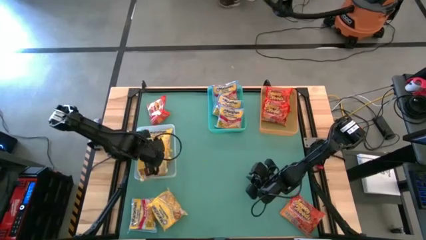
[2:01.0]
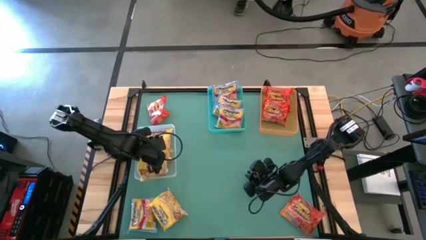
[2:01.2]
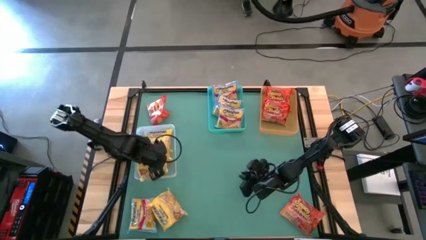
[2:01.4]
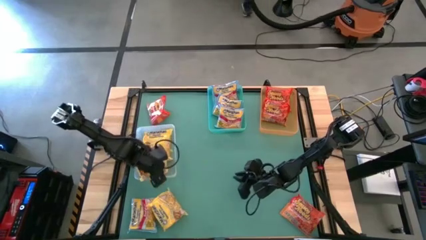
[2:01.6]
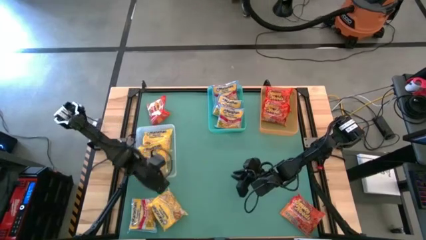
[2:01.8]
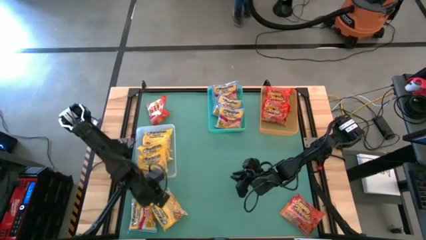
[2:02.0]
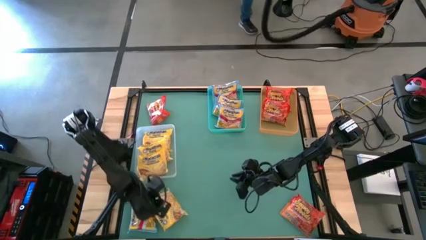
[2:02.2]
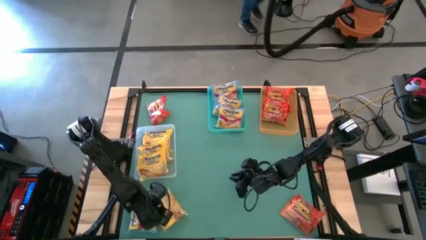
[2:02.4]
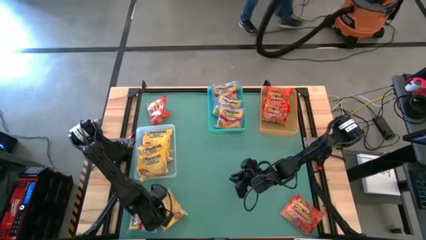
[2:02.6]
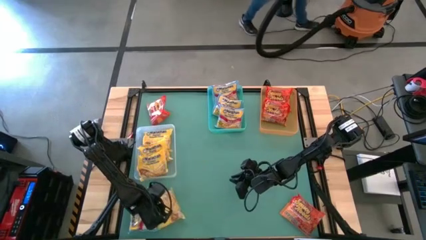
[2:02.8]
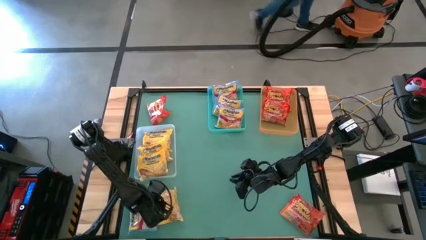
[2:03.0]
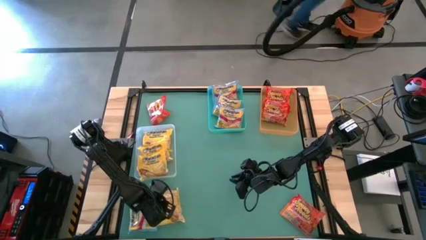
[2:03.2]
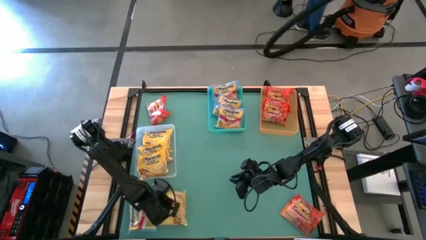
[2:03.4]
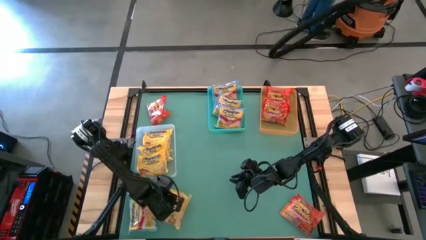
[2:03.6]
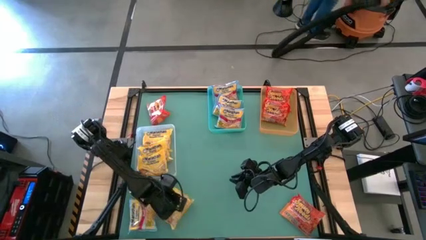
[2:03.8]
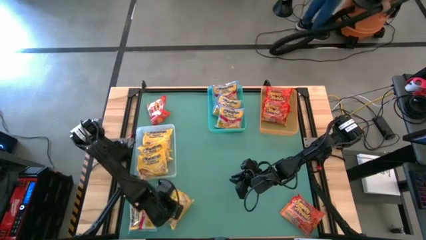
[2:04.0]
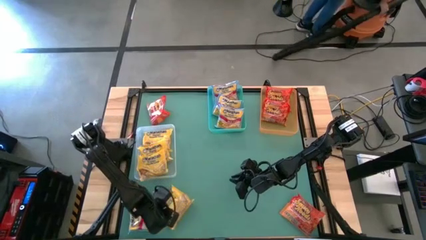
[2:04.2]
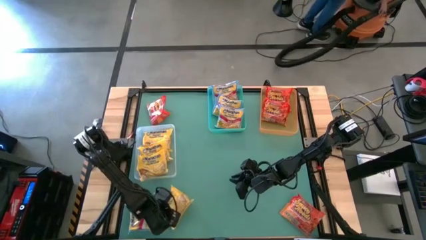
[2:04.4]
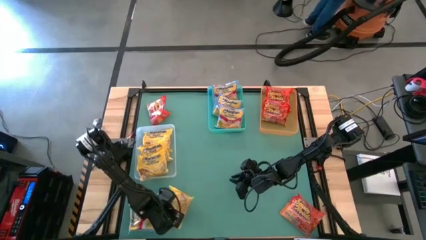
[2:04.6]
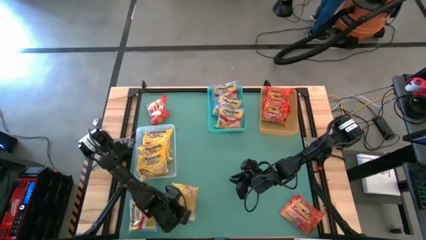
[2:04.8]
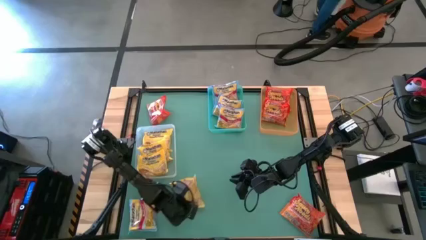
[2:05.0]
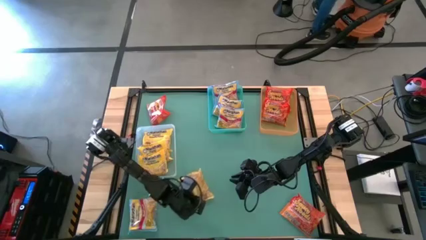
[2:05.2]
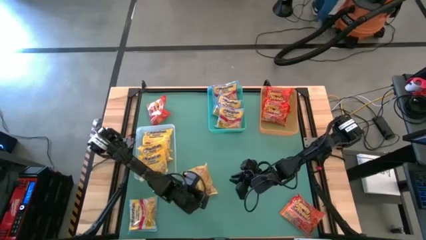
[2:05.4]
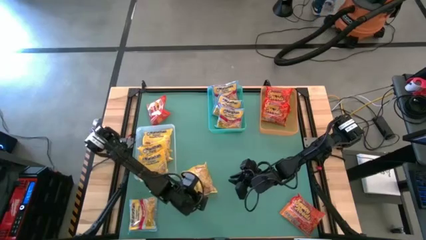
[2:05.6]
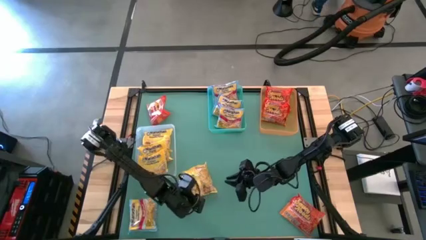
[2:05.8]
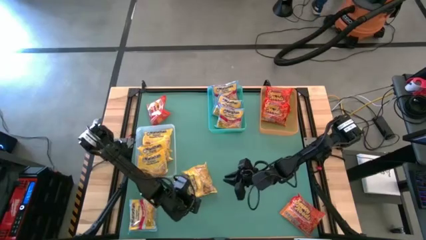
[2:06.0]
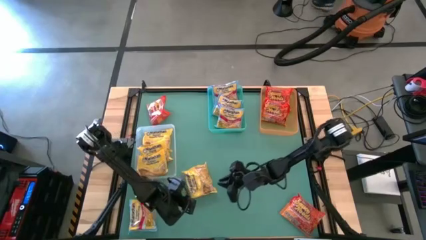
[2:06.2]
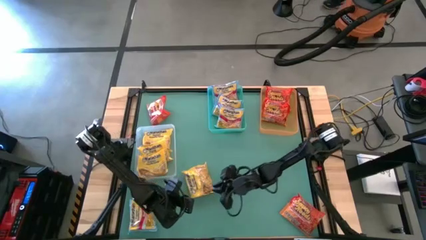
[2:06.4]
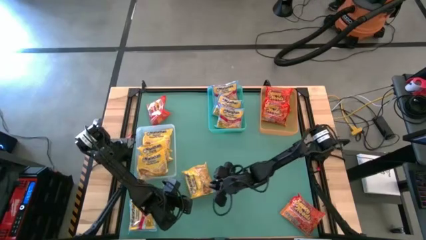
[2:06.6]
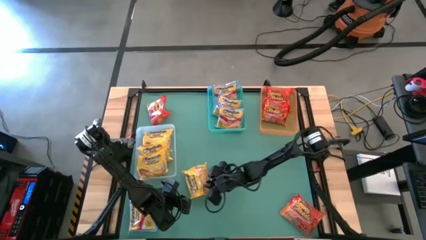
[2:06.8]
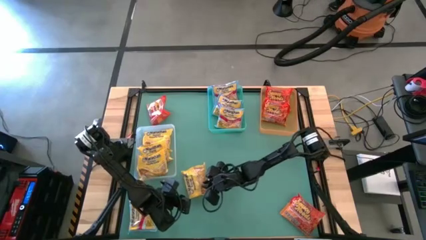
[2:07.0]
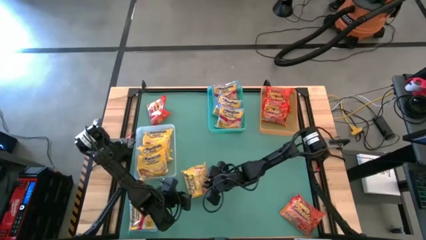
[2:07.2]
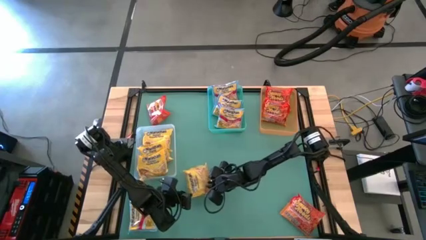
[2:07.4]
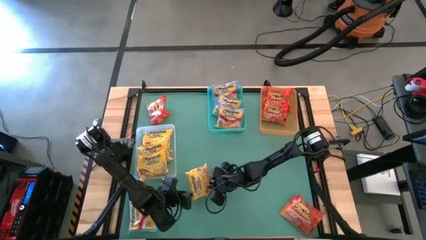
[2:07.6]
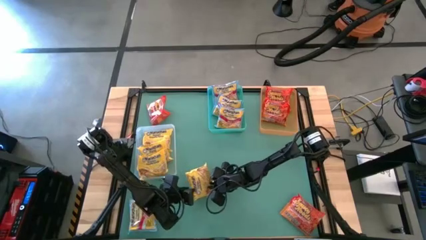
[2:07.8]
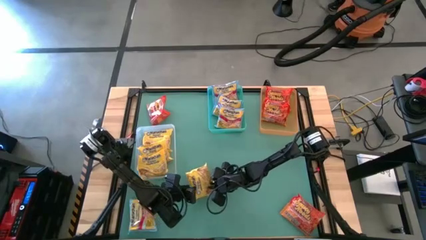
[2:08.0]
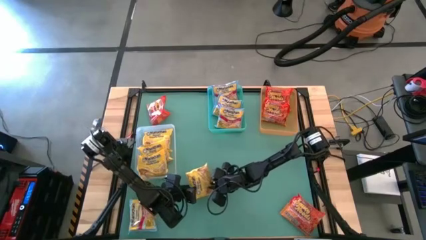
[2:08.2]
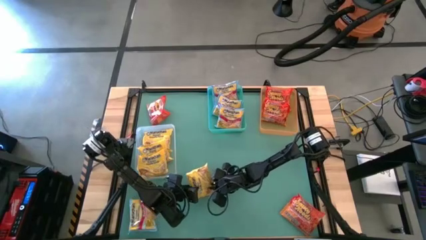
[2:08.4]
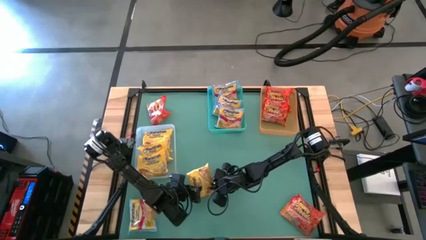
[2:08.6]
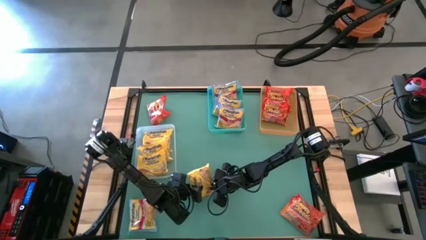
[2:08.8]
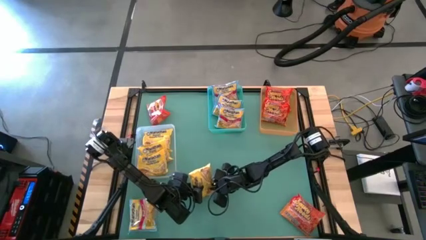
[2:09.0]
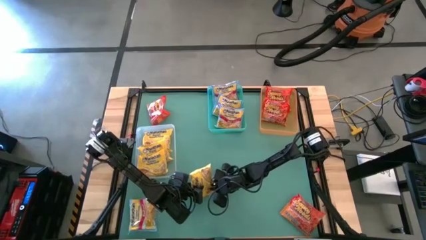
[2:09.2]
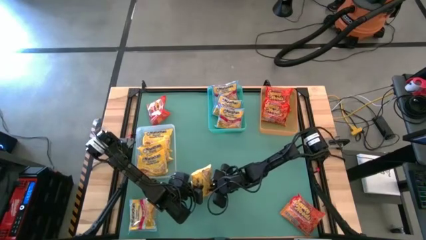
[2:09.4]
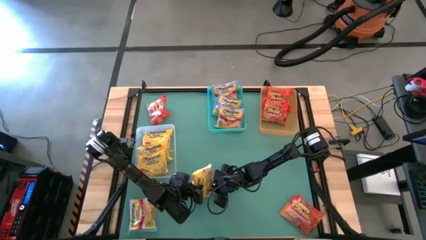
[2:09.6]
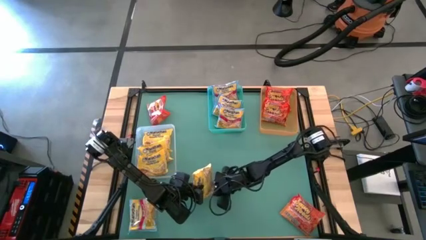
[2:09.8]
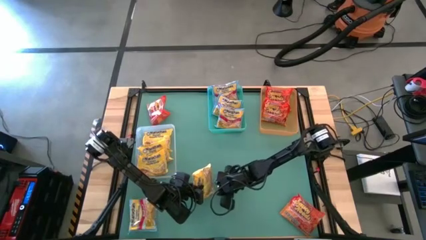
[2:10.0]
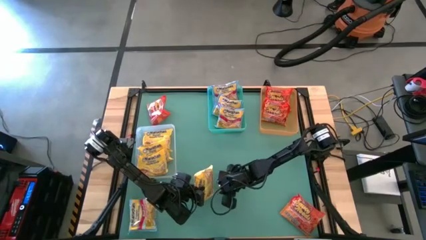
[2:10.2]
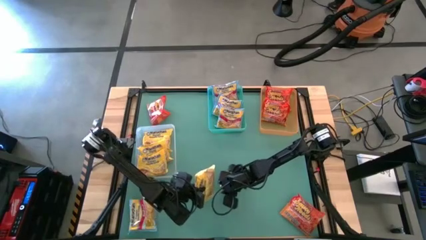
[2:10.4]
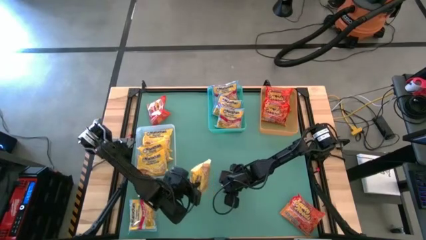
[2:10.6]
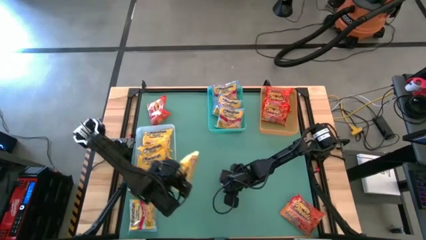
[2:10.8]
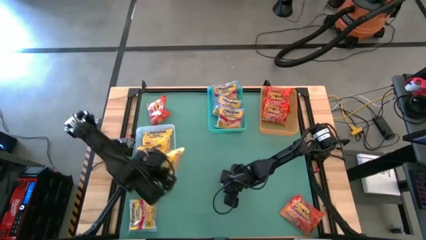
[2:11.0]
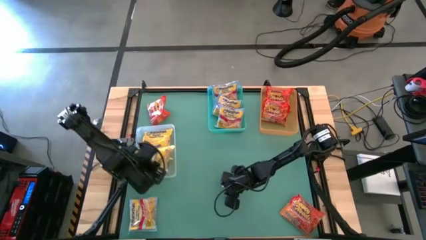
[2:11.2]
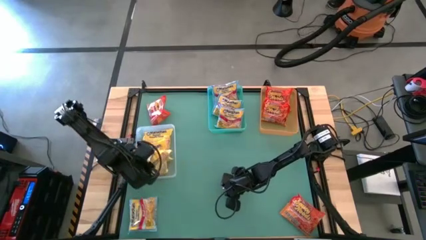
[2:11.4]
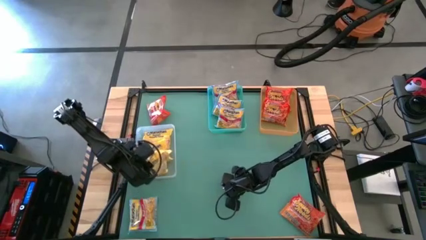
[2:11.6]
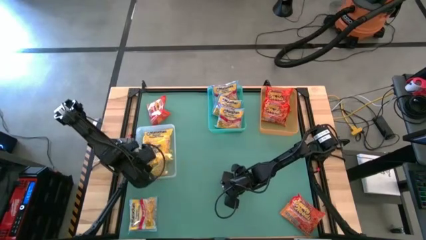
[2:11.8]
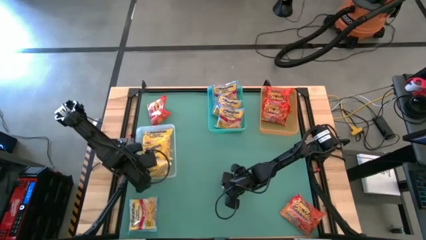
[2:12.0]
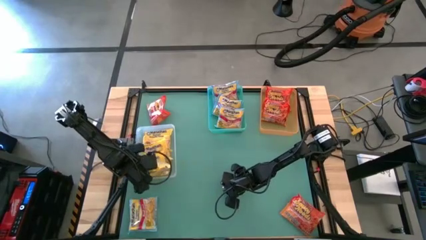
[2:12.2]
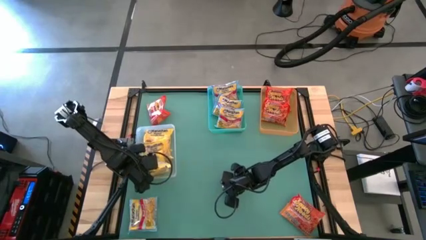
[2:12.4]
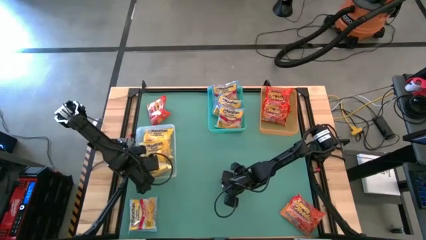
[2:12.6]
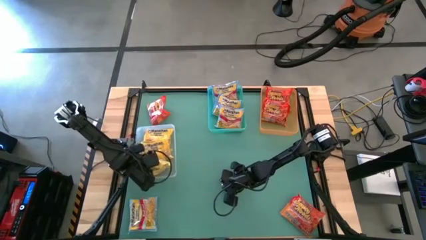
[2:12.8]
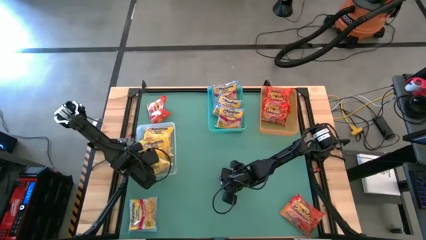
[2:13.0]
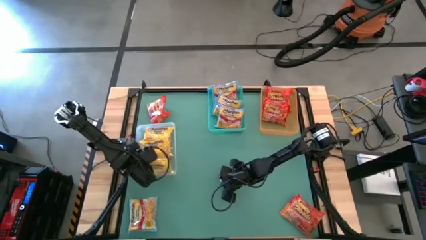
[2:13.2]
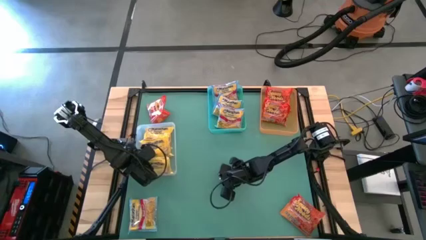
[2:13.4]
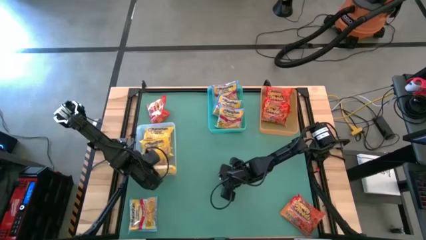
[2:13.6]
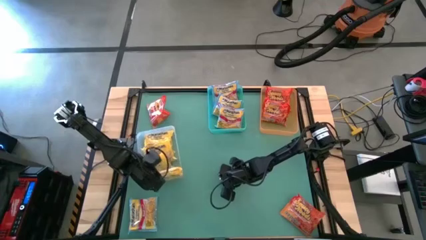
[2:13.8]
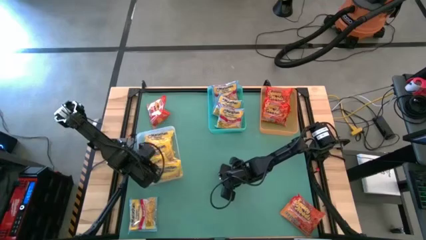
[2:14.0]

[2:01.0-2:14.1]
Task: Sort Maruchan noodles
Put the yellow noodle pack into the transparent bin

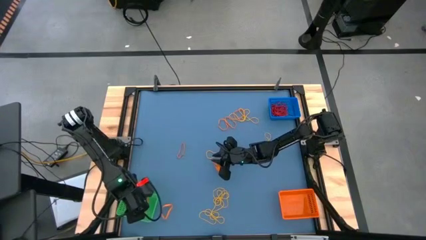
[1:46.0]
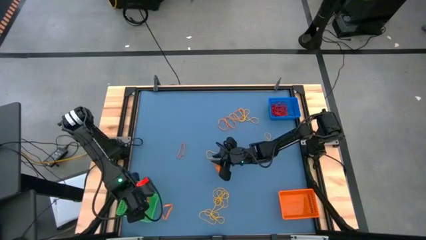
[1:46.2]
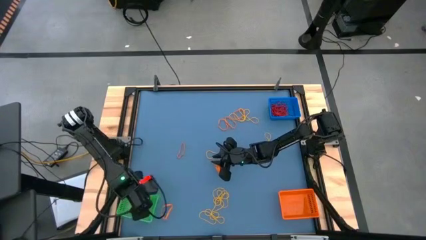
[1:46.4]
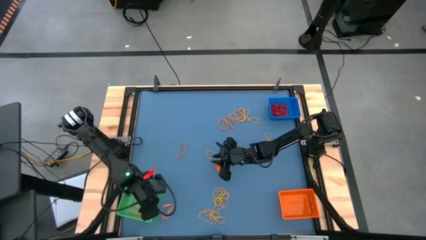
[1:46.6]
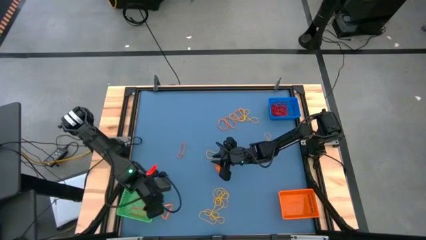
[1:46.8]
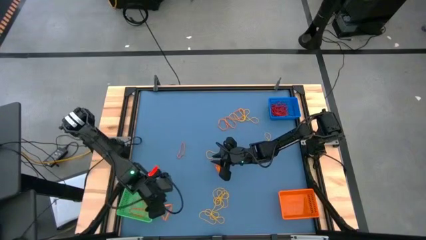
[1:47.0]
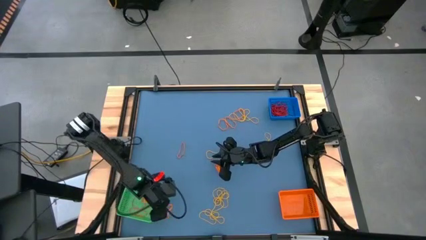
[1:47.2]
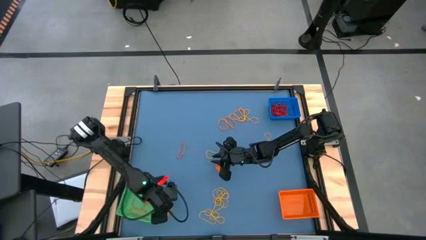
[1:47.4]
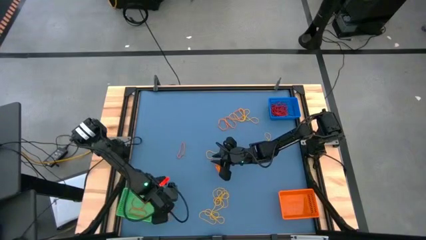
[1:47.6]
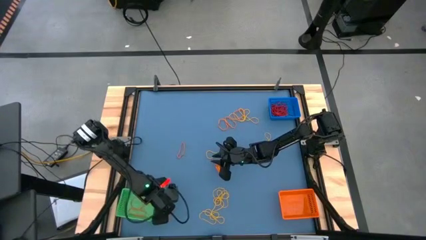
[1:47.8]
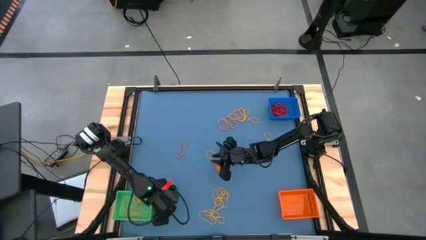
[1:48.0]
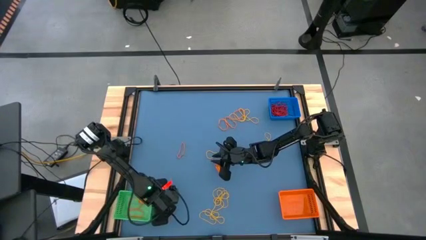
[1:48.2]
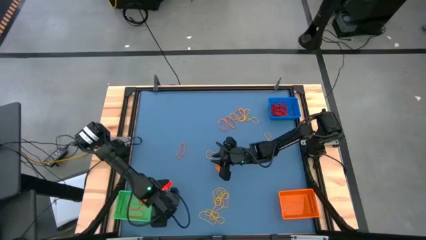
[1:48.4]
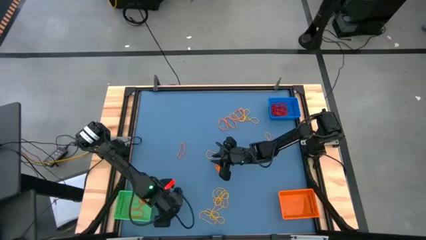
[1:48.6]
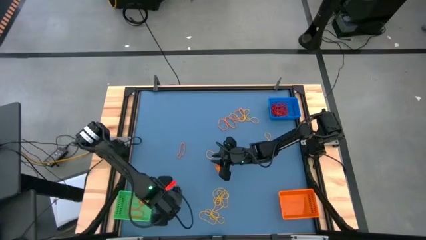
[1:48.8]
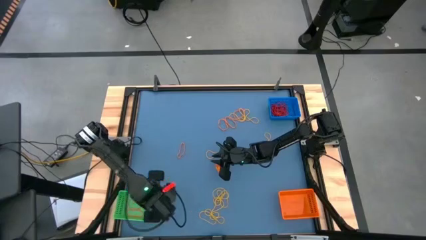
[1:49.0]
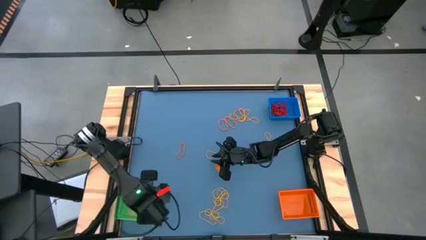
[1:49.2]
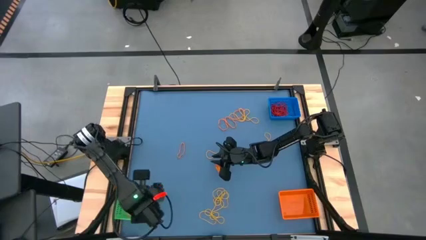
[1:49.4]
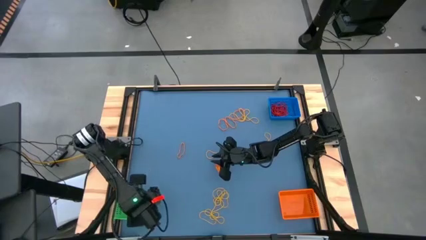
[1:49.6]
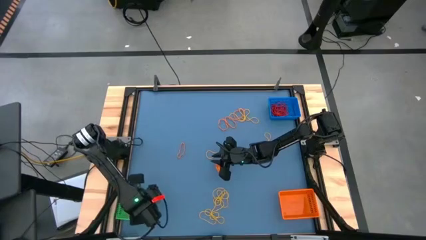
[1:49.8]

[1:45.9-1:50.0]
Task: Sort rubber bands into baskets
Put the orange rubber band into the green bin
